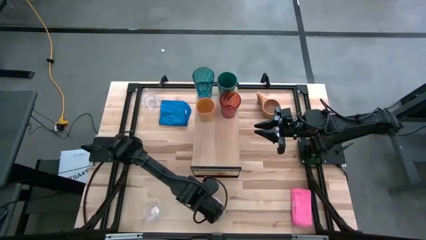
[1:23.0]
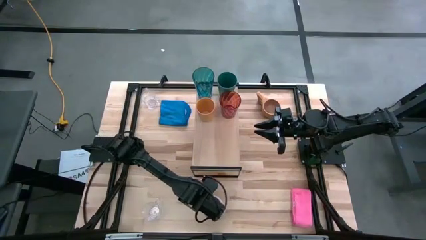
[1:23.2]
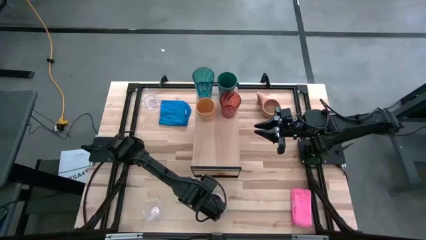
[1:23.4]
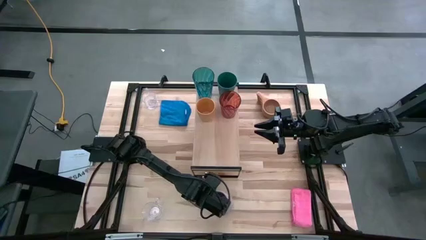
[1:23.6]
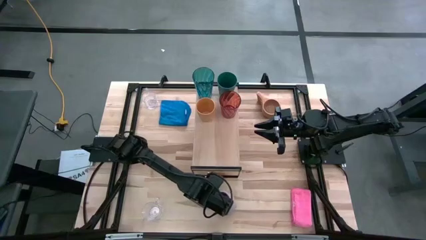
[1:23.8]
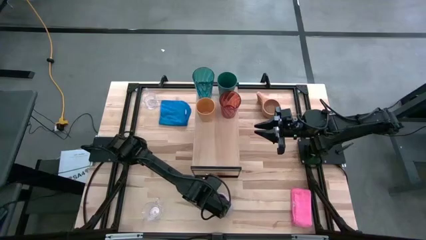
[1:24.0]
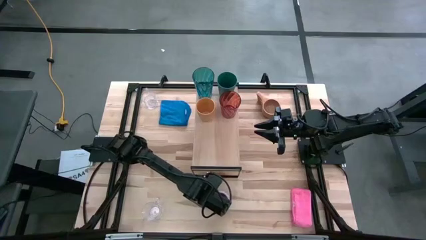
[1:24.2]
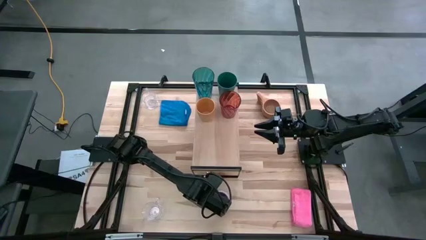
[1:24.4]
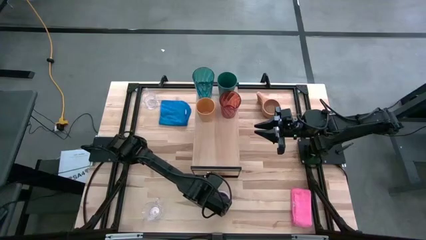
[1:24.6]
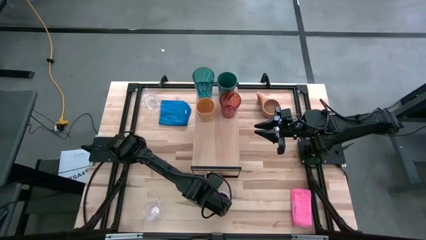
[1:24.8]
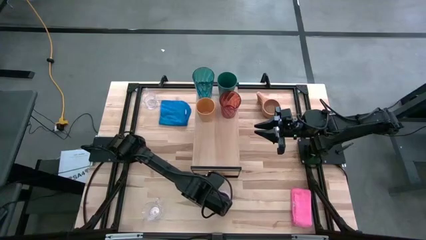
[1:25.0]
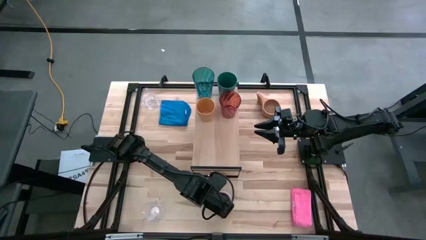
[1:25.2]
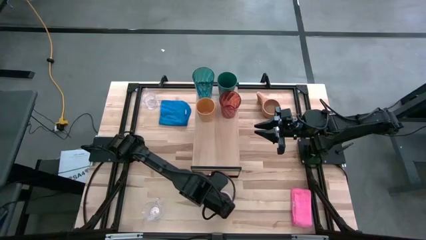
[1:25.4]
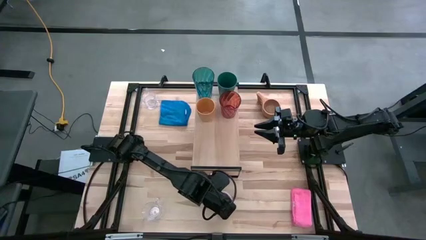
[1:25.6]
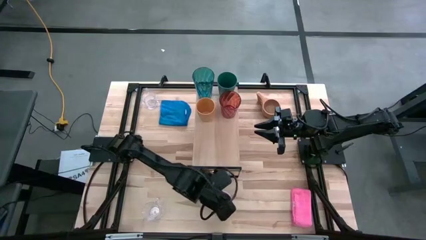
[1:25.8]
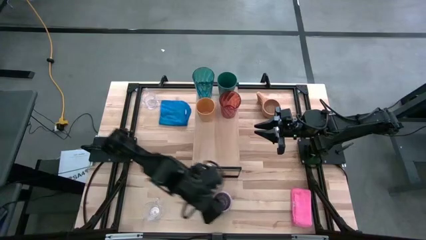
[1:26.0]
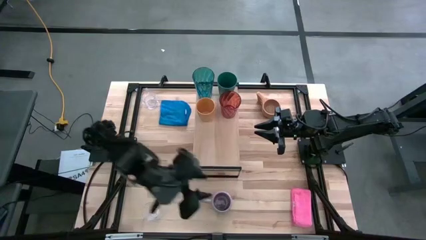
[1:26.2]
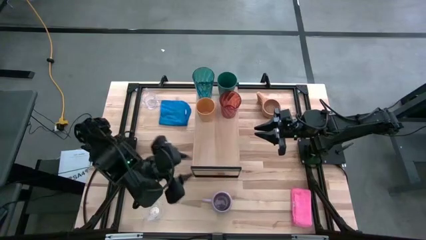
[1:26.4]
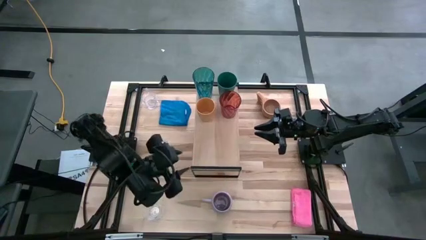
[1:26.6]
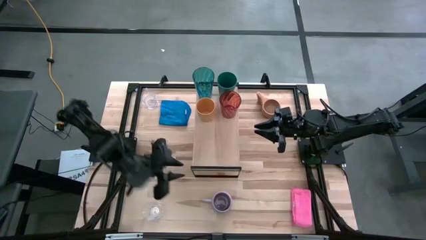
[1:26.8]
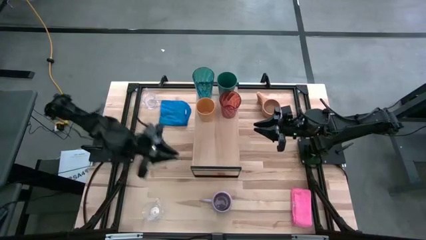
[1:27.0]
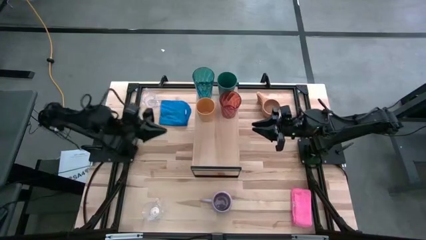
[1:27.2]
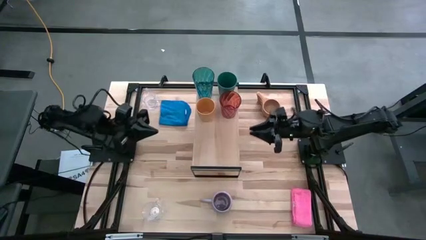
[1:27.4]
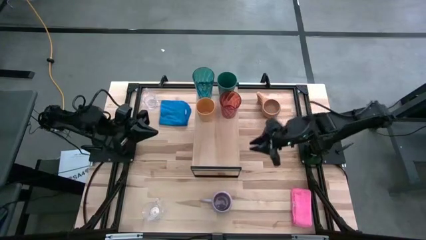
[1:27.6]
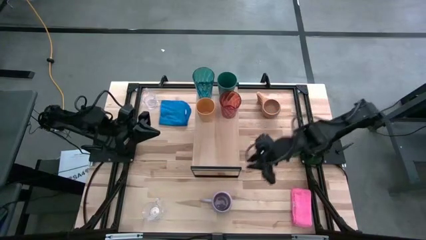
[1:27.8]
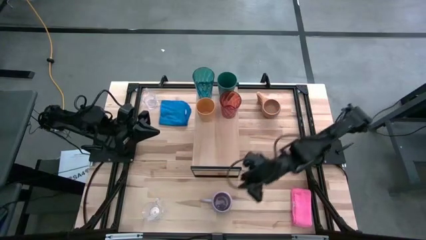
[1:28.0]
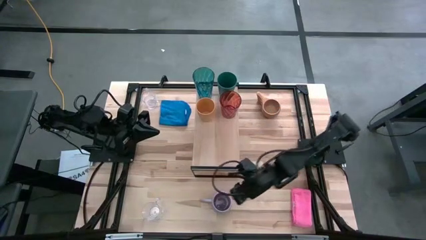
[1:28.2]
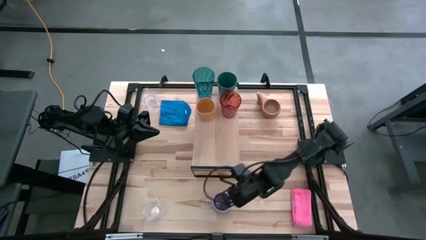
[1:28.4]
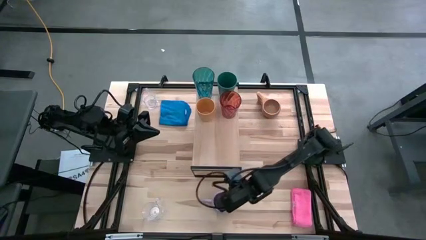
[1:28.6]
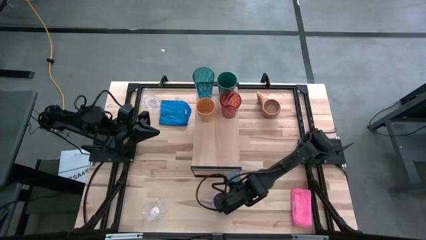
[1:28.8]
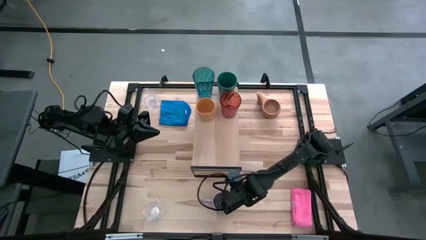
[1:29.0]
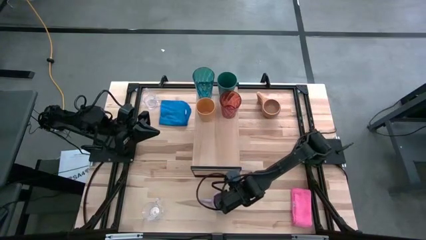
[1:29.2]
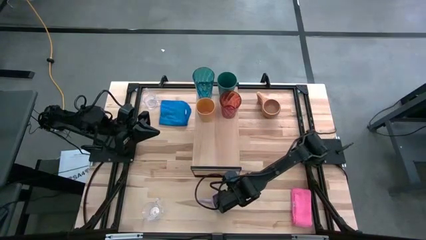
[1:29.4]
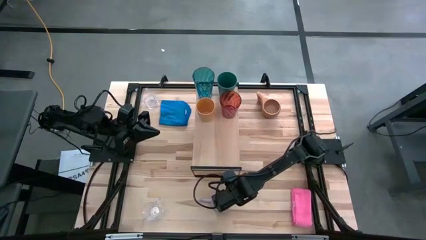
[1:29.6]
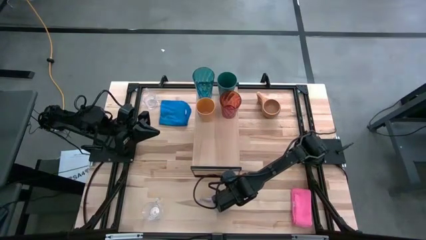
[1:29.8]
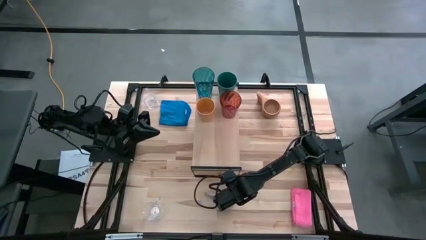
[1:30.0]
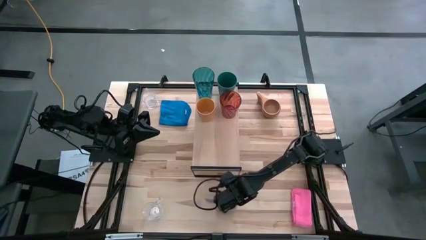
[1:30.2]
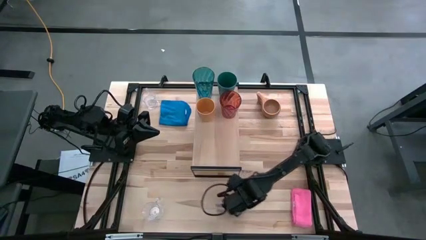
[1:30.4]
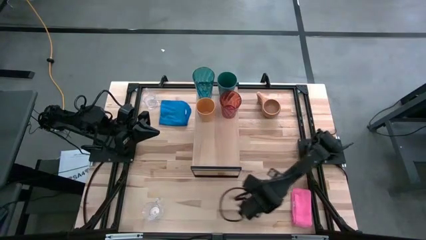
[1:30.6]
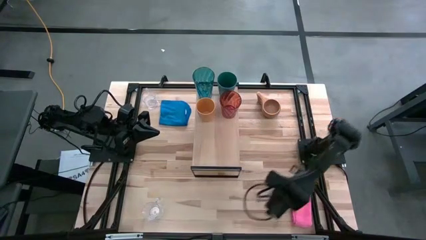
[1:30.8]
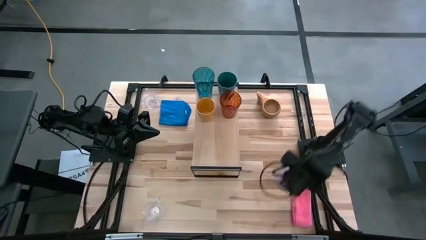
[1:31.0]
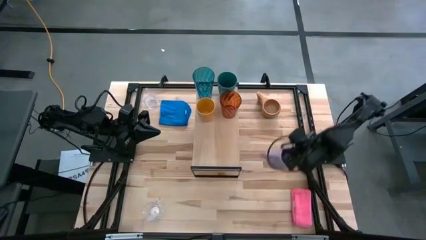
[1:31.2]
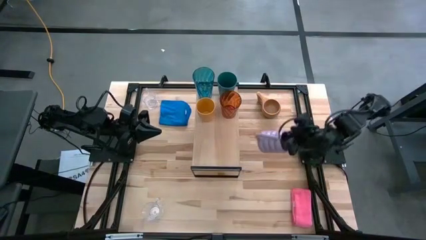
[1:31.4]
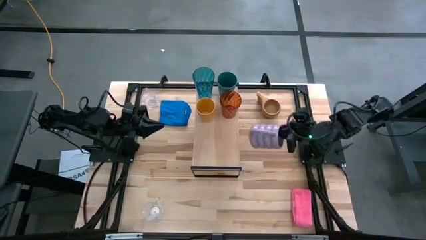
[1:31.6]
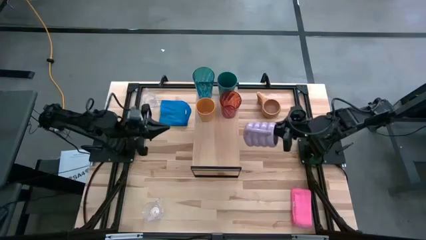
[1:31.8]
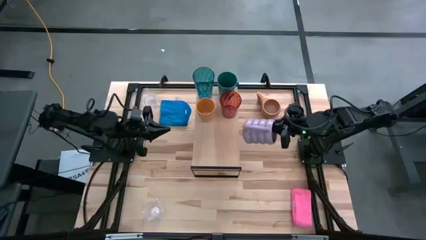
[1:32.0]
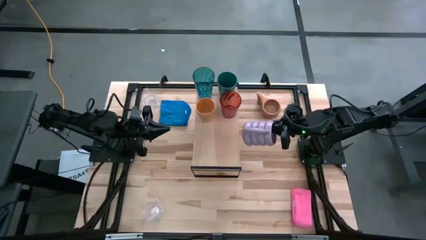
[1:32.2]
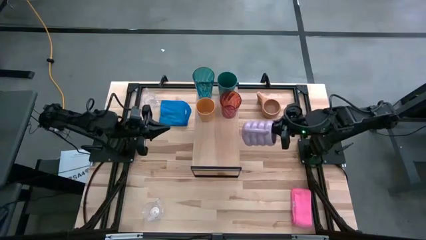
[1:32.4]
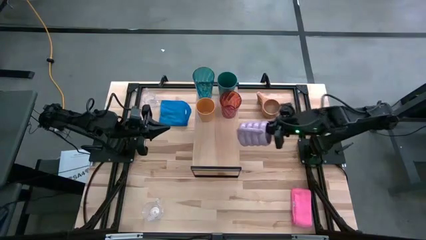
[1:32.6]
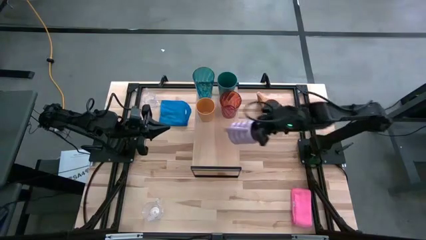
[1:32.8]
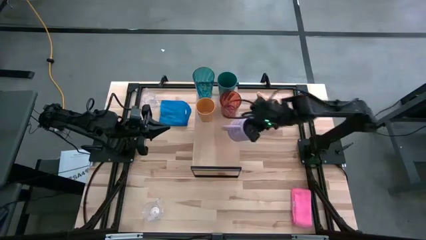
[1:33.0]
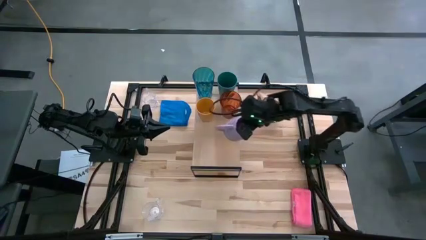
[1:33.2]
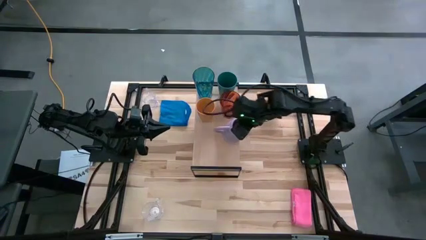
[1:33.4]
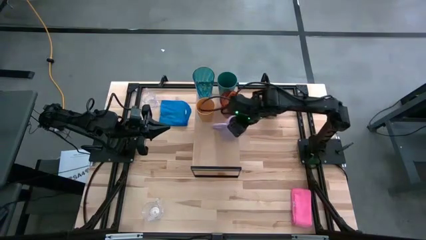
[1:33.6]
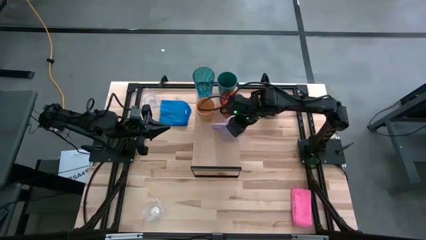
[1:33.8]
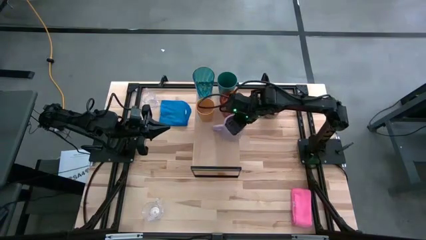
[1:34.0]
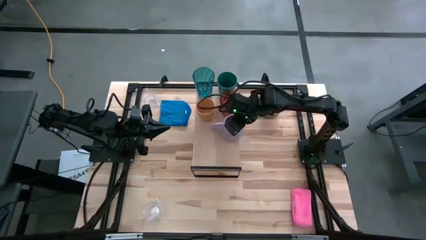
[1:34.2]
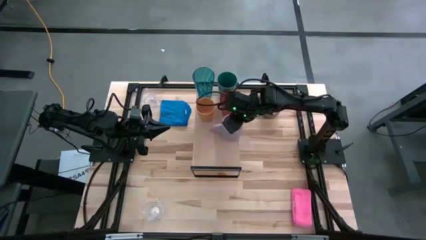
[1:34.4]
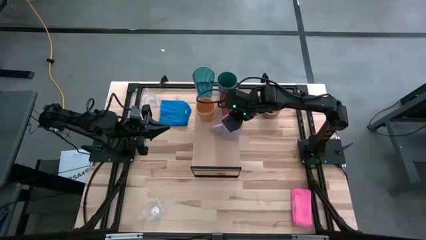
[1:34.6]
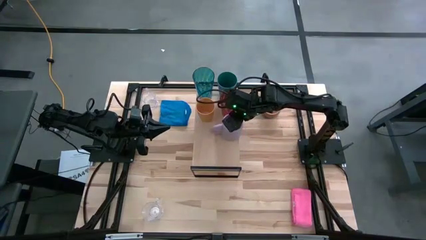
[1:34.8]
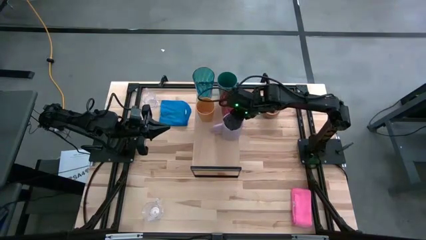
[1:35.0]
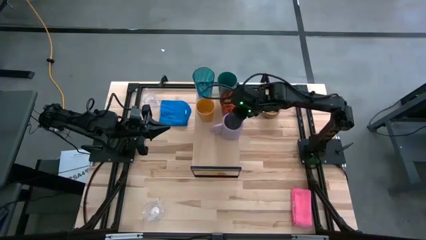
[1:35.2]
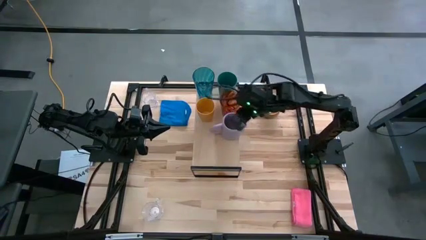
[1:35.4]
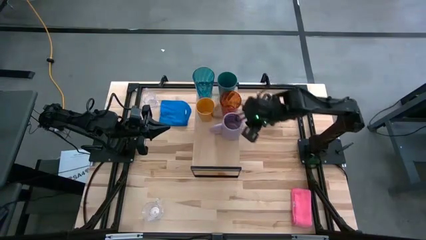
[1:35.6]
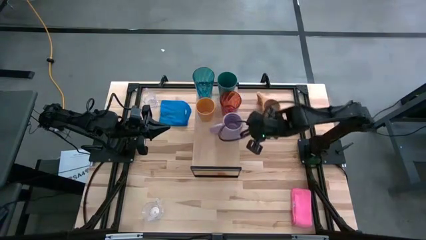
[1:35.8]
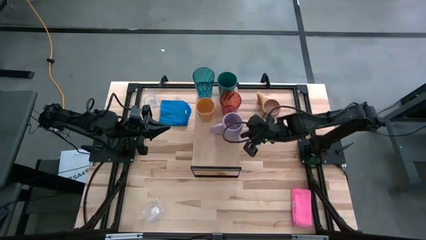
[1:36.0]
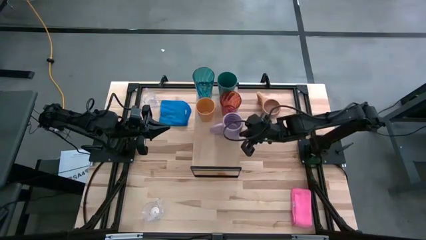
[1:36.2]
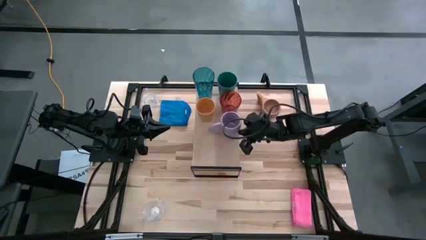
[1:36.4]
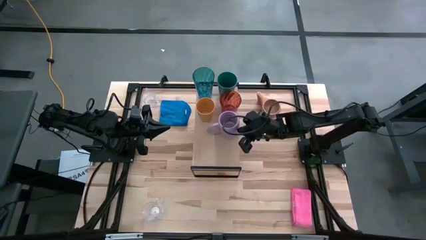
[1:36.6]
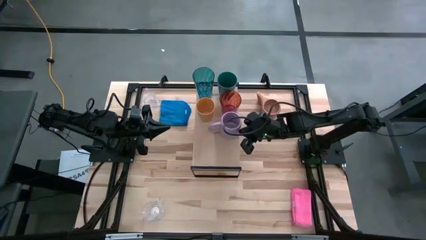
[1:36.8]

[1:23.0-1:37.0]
Task: Stack small to large cups/mugs on shelf
Put the purple mug on the shelf

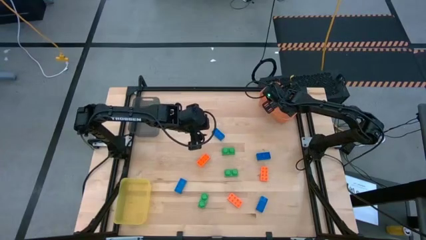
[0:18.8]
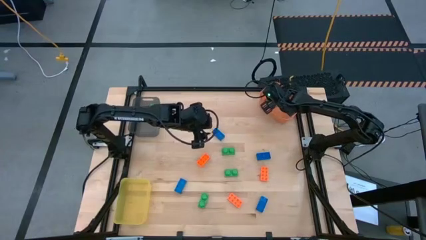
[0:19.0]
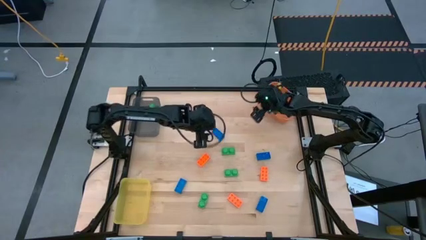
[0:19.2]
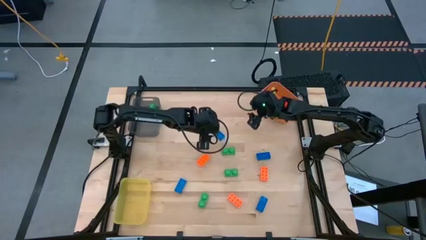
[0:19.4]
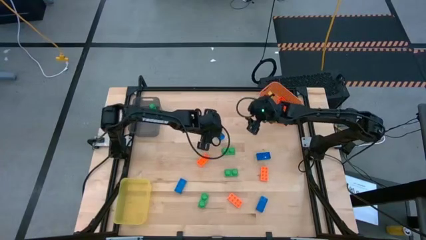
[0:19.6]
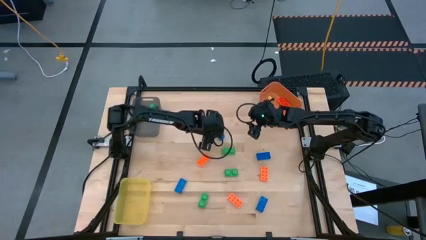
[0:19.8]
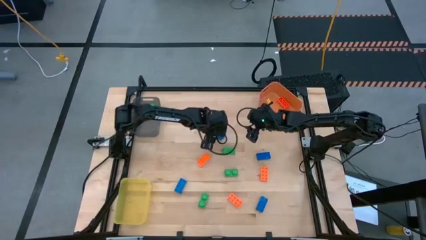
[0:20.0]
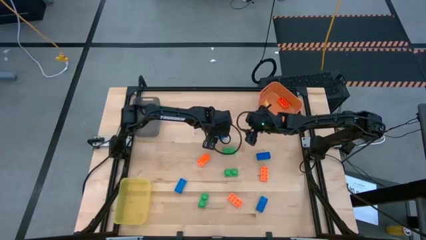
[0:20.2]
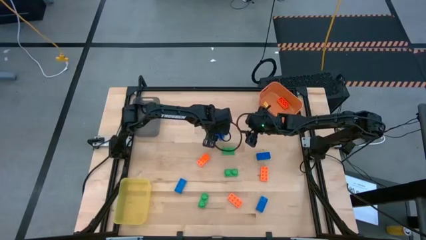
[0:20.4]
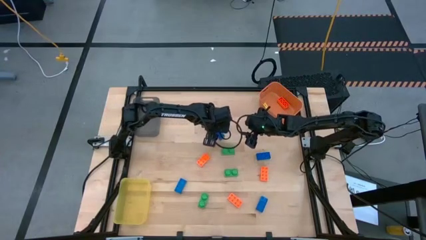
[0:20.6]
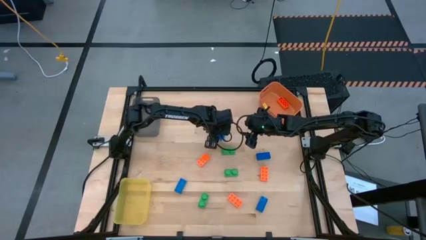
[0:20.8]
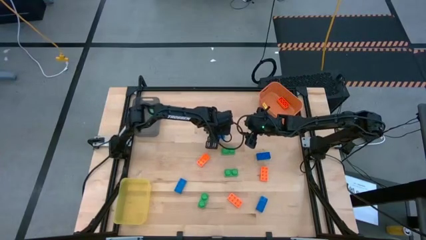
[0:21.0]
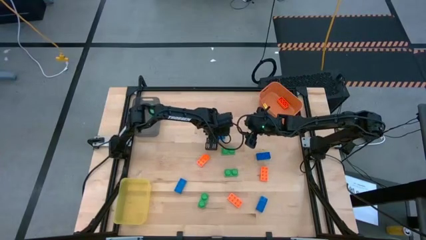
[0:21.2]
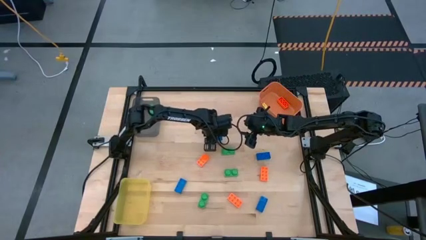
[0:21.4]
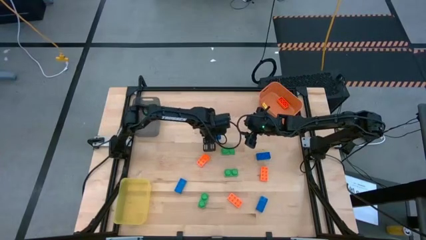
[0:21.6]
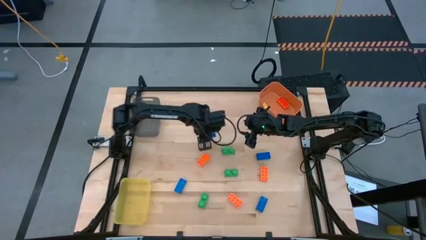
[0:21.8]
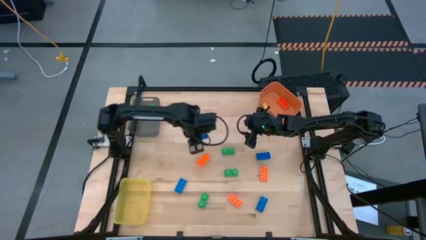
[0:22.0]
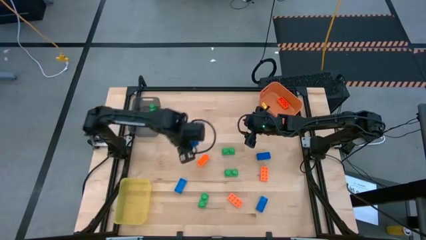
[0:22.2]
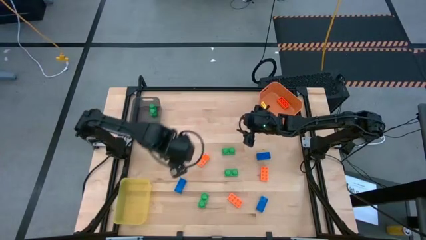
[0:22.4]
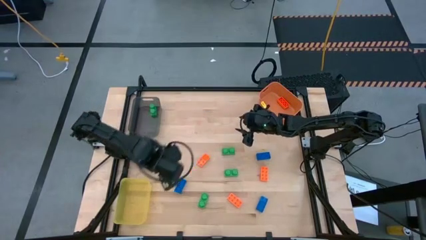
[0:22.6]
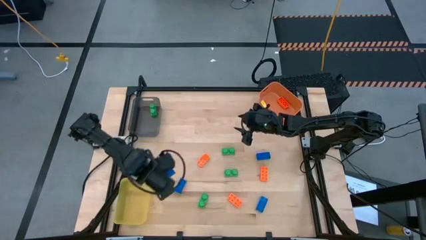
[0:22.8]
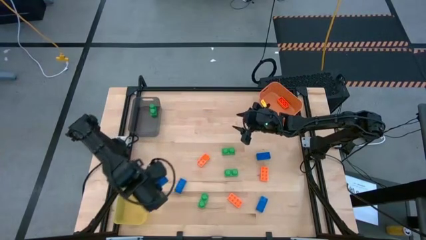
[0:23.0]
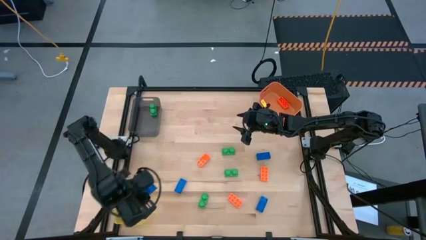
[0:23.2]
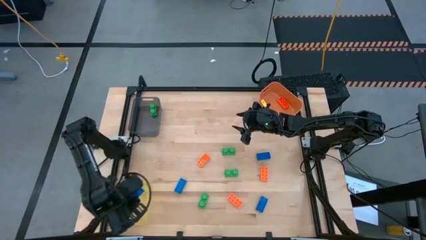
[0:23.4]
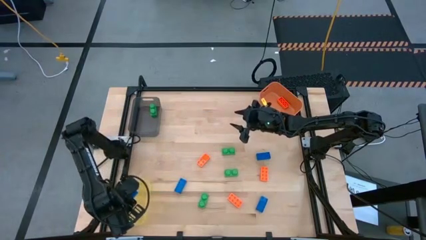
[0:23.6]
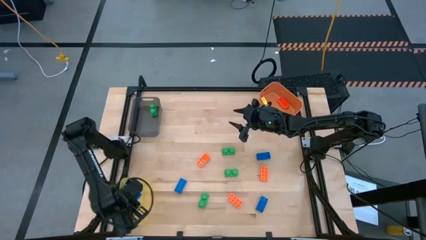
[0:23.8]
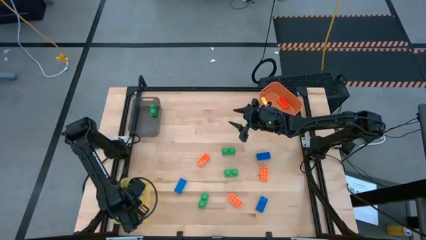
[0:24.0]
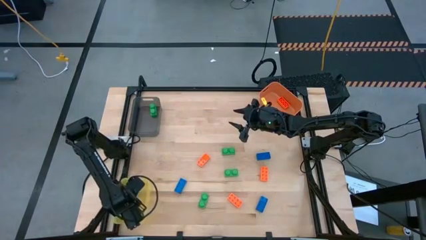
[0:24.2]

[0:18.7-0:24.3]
Task: Sort & place blocks by color
Put the blue game piece into the yellow bin
